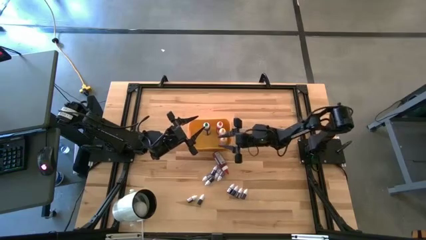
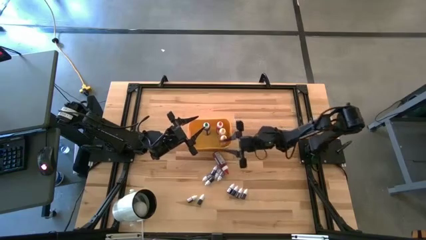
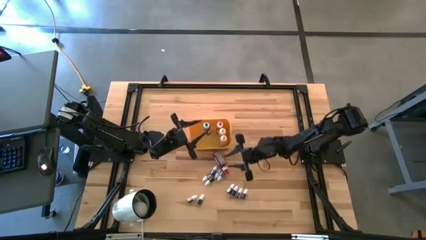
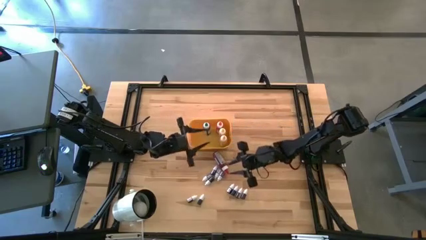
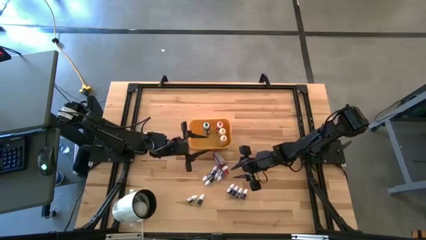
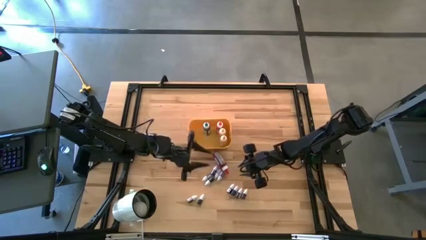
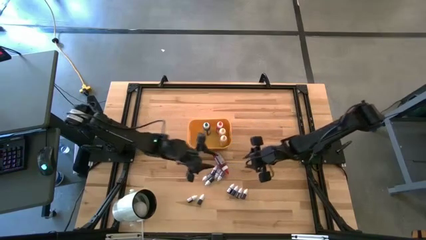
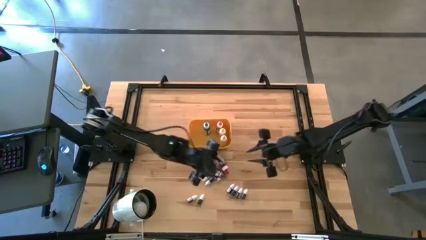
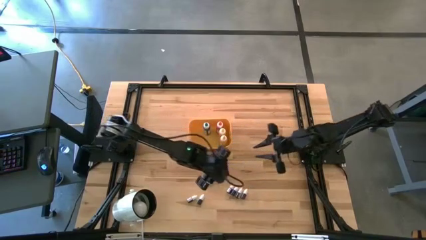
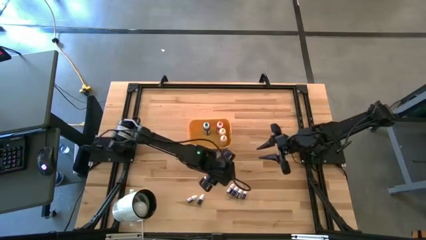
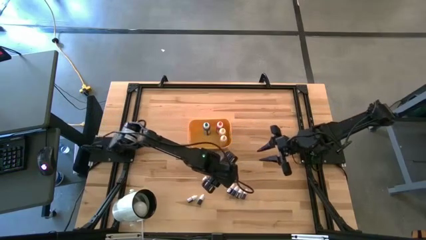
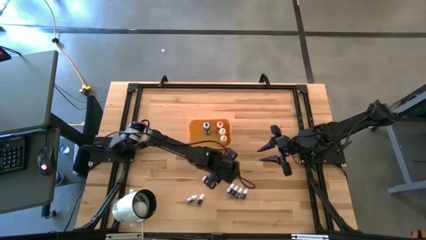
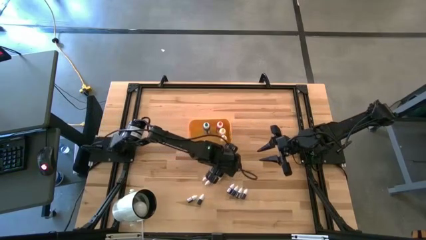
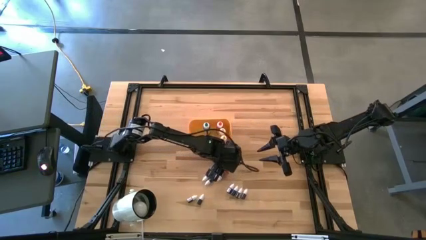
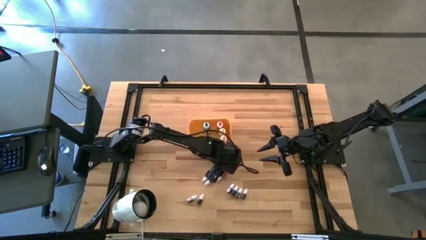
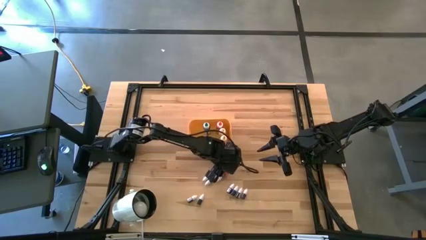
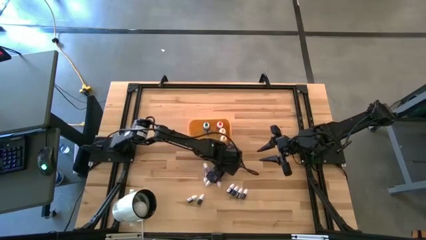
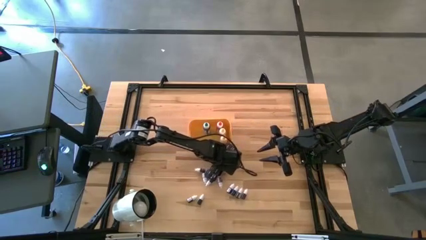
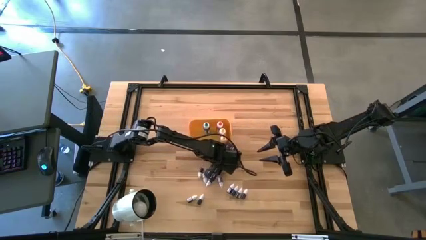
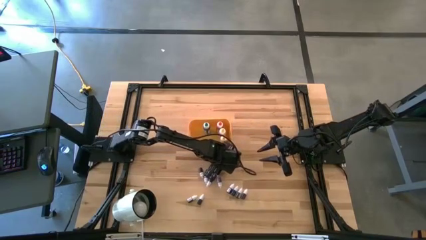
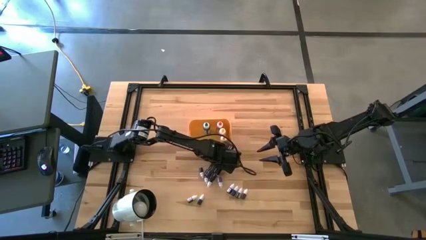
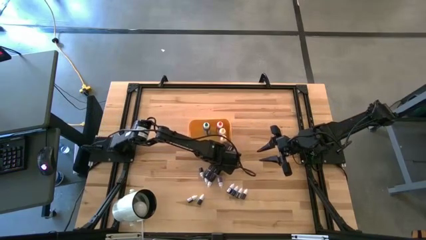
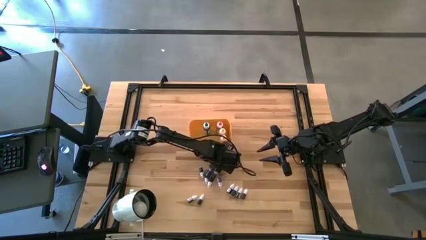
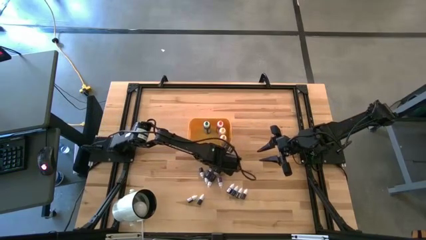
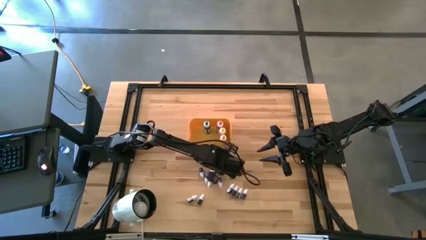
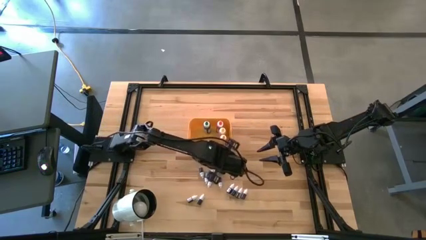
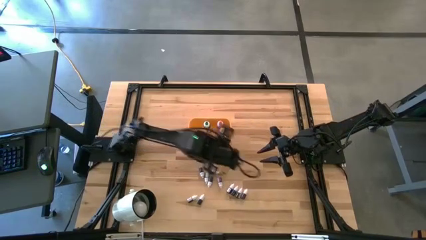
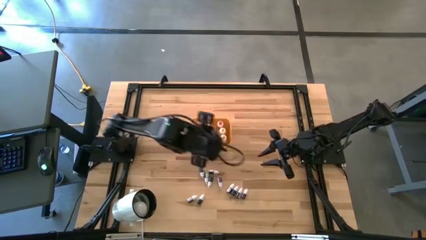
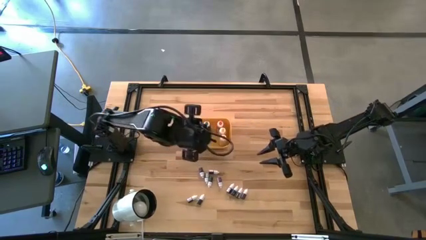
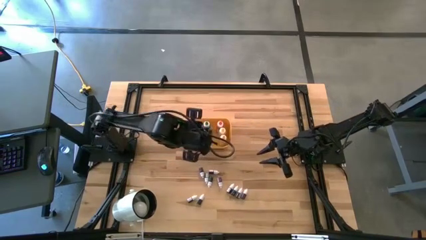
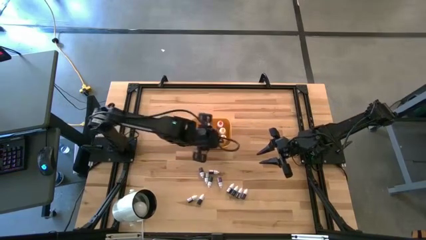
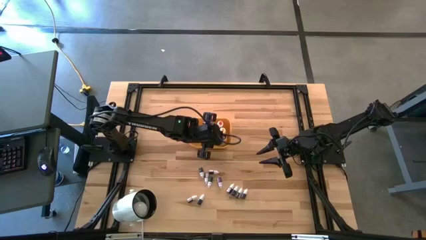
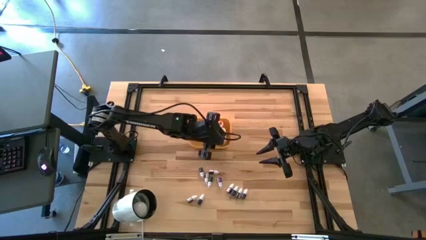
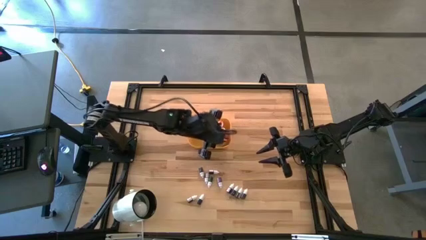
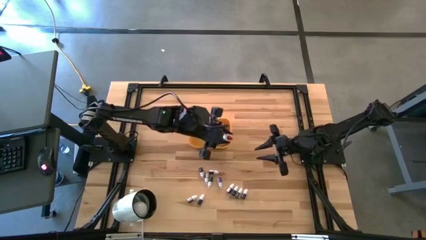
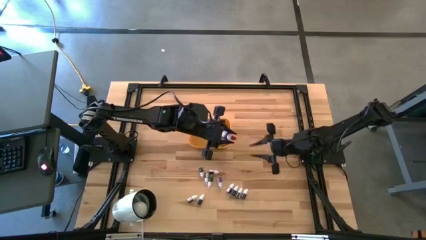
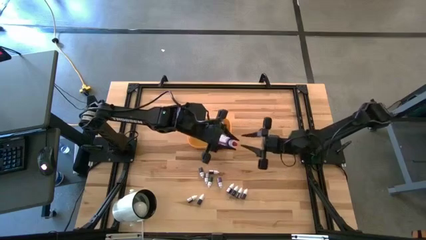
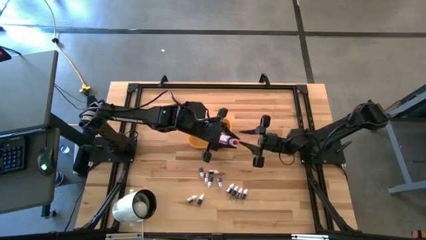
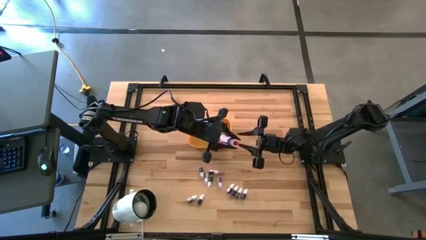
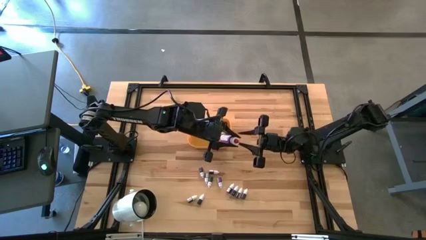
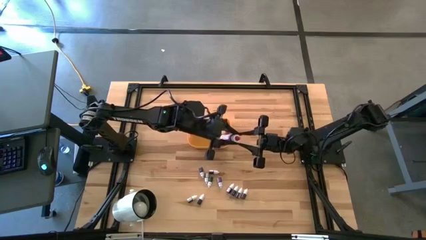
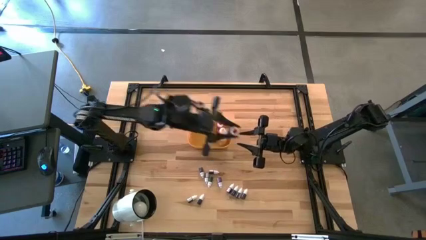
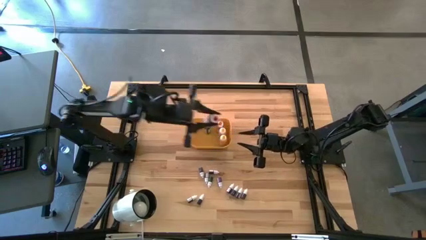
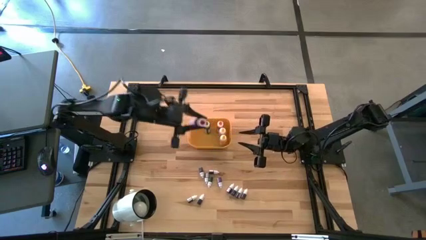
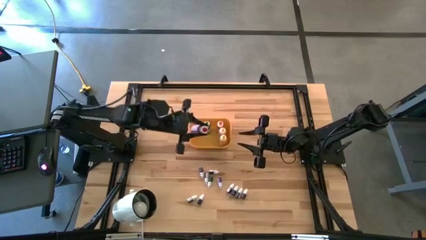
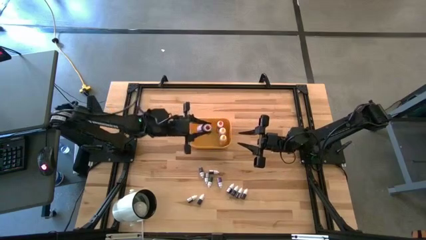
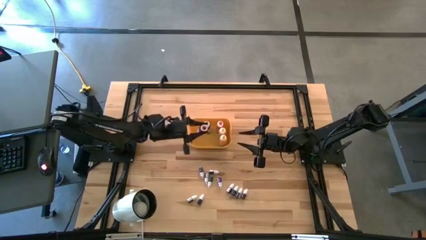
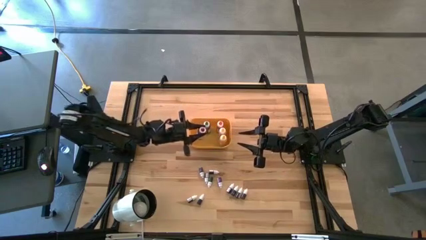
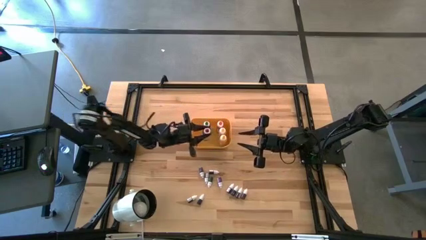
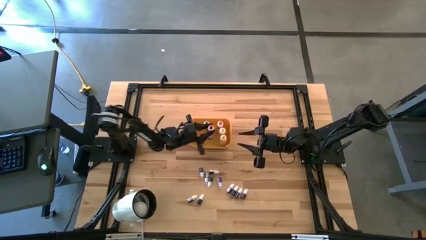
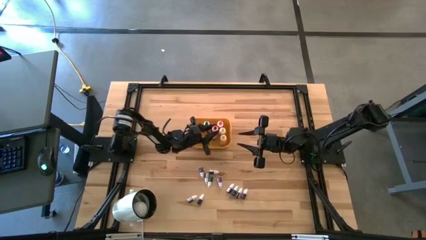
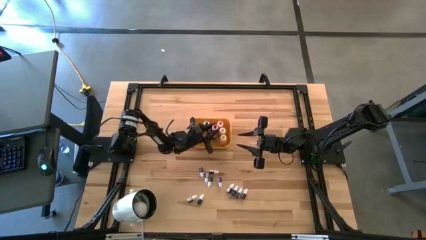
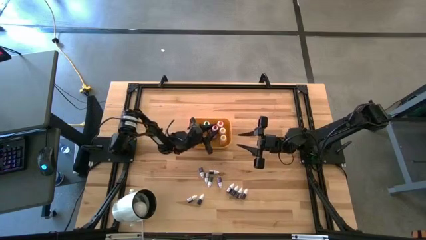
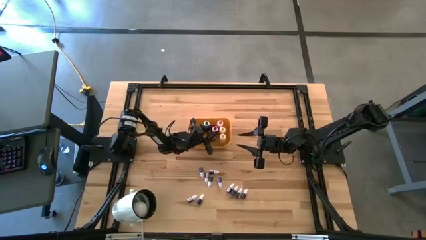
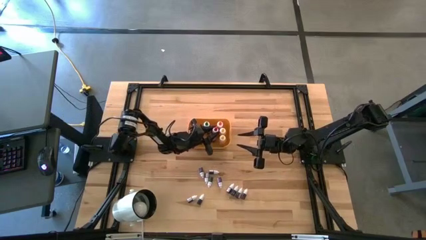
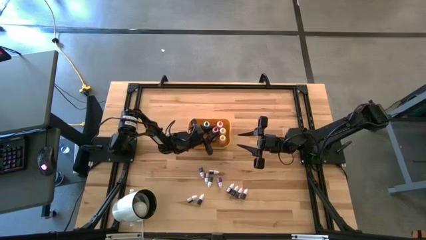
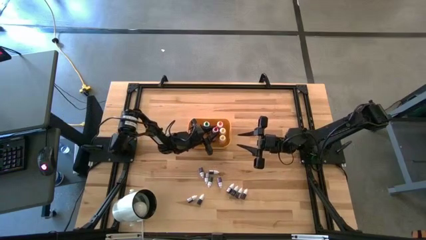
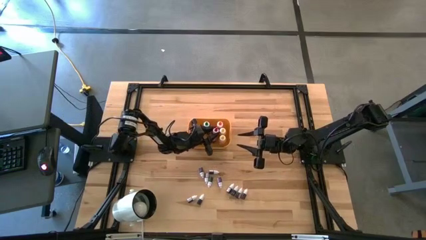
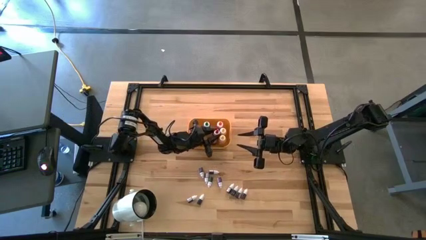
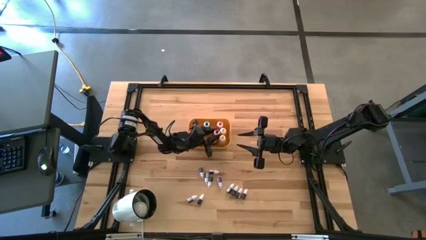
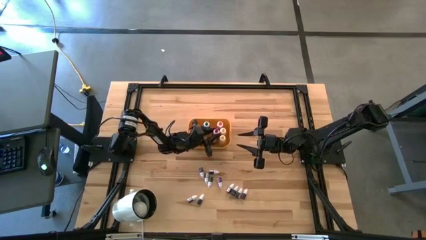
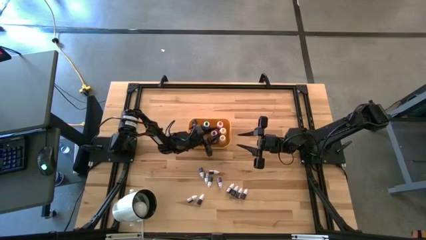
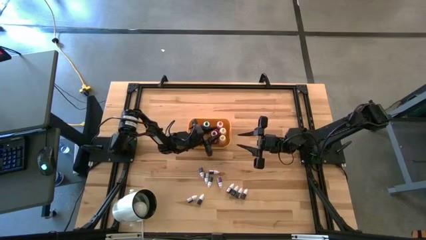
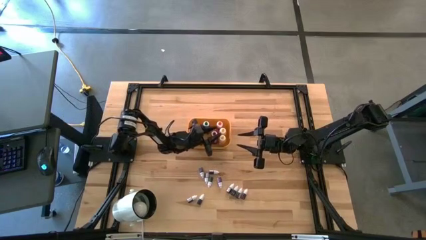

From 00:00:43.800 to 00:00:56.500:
Task: Pick & Place food coloring
Put the large red food coloring bottle into the yellow bin

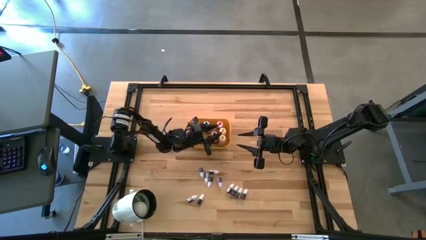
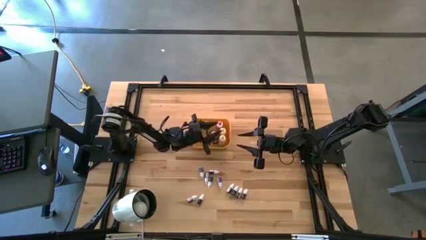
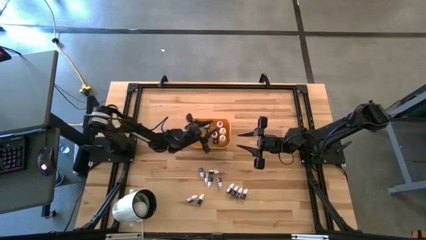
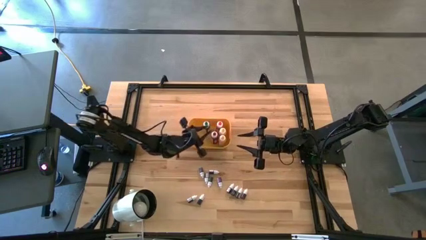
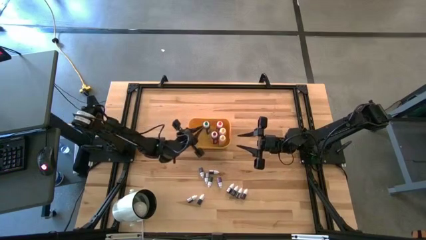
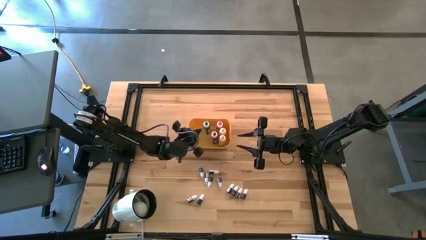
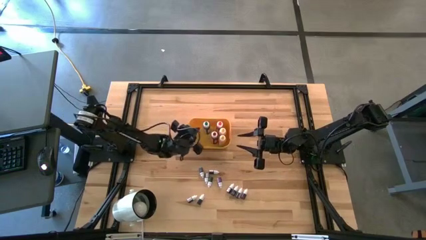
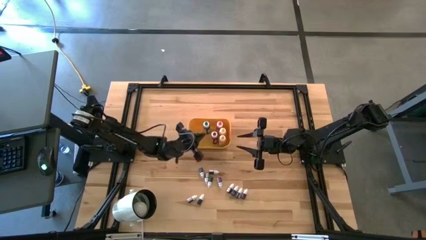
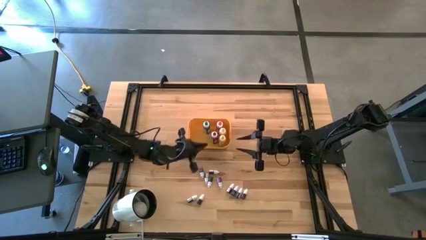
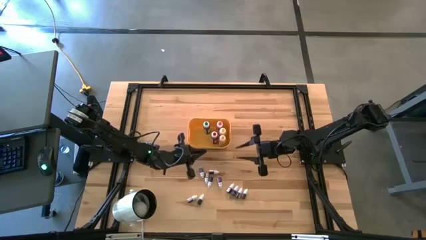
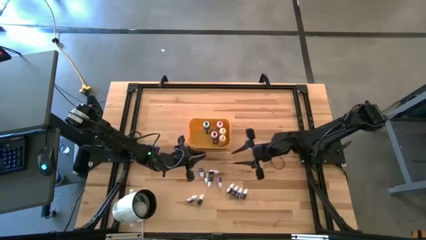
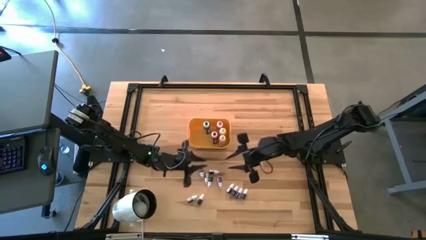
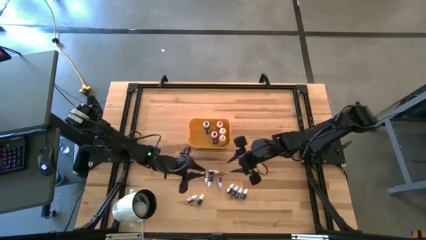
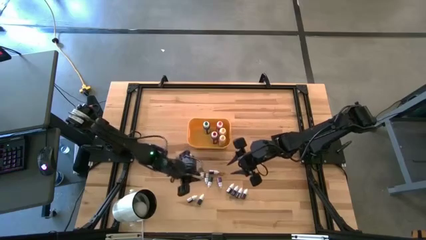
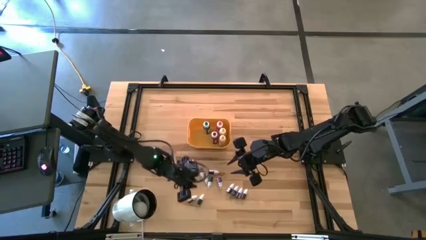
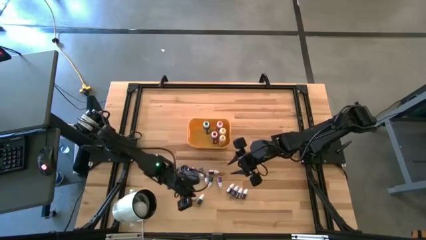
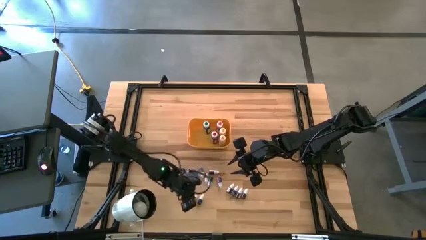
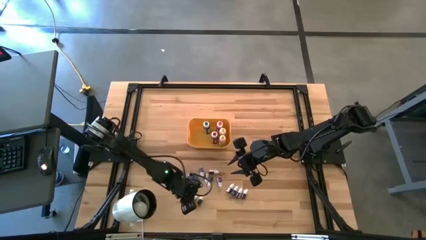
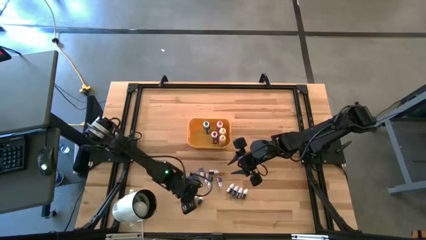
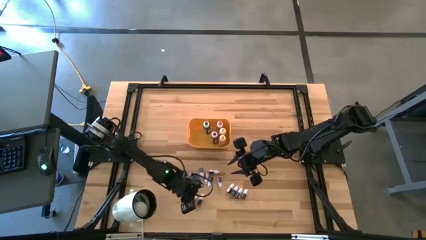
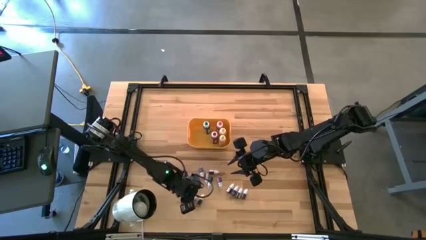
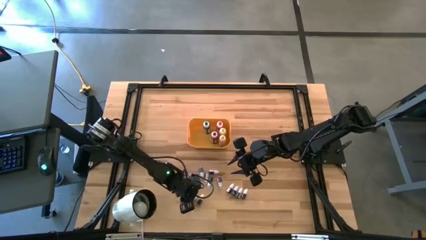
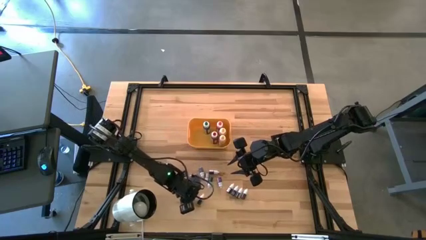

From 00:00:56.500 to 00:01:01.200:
Put the small red food coloring bottle into the yellow bin
